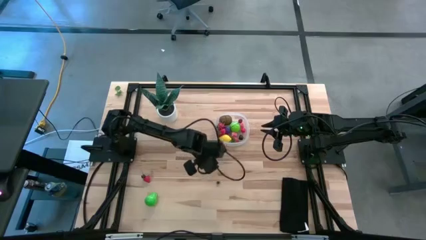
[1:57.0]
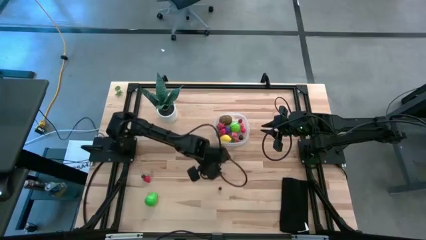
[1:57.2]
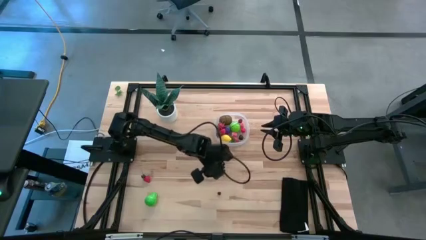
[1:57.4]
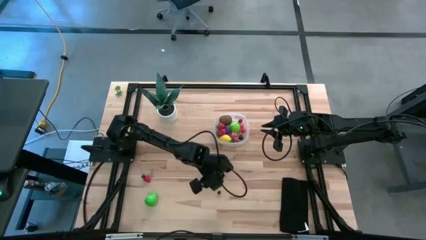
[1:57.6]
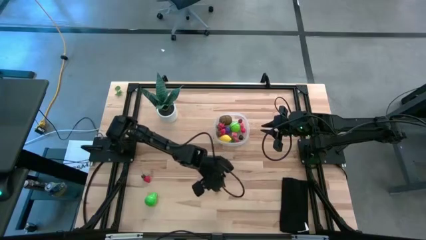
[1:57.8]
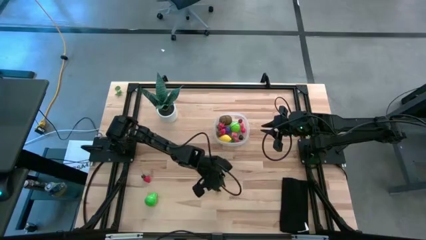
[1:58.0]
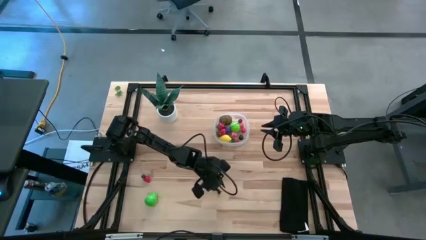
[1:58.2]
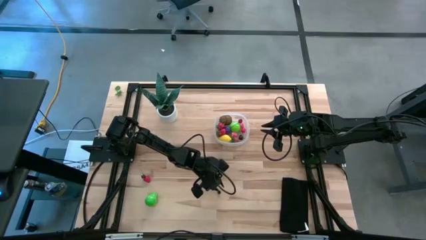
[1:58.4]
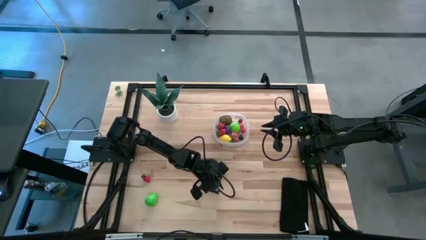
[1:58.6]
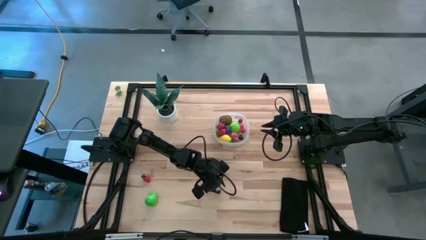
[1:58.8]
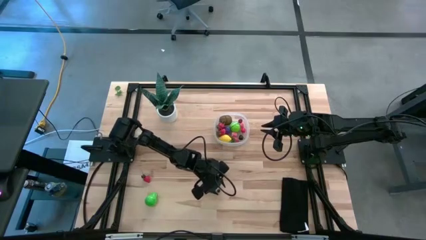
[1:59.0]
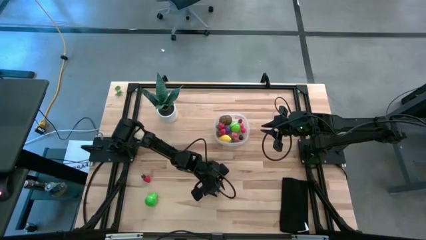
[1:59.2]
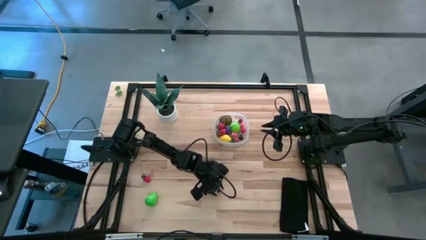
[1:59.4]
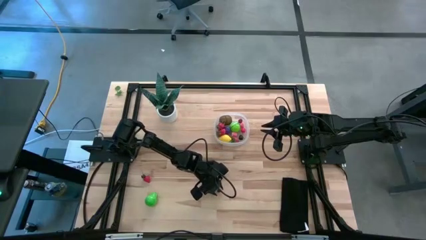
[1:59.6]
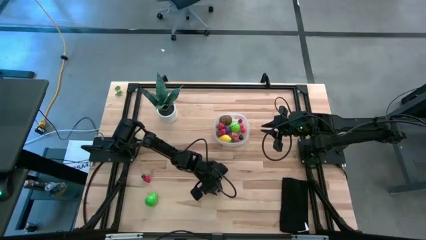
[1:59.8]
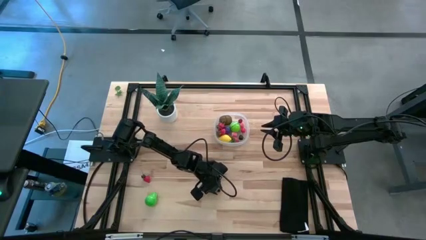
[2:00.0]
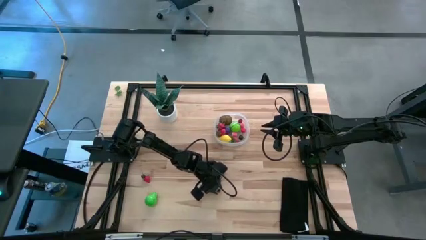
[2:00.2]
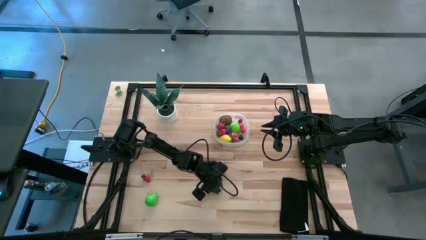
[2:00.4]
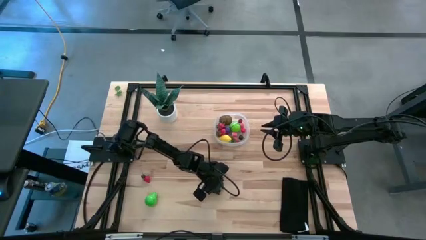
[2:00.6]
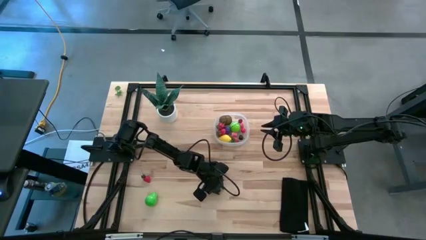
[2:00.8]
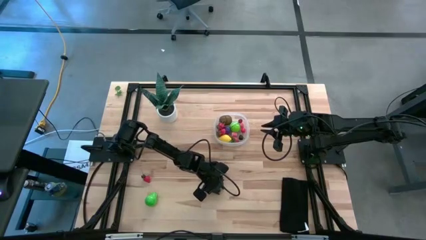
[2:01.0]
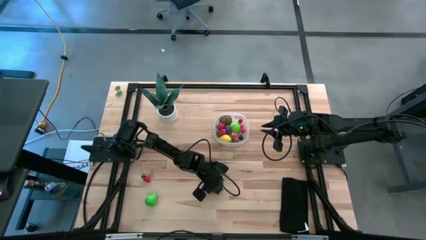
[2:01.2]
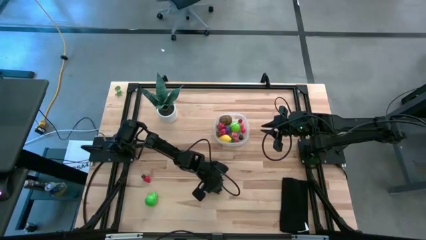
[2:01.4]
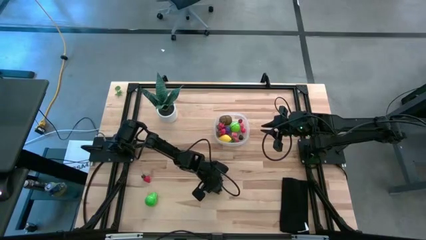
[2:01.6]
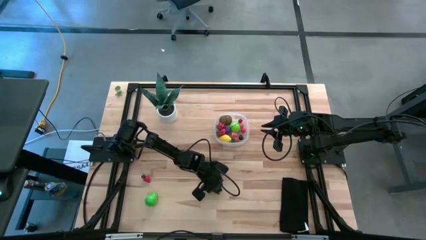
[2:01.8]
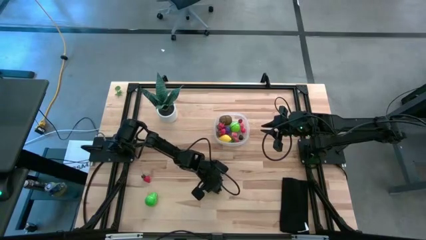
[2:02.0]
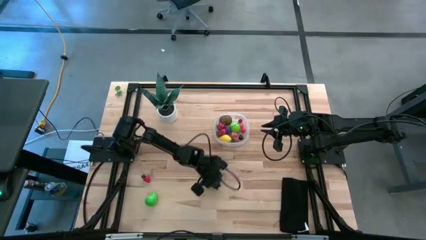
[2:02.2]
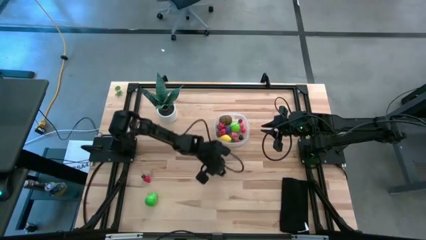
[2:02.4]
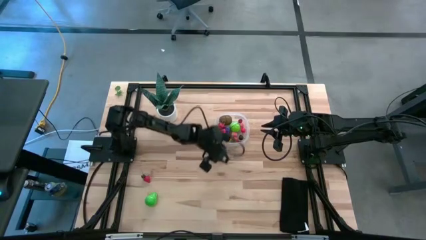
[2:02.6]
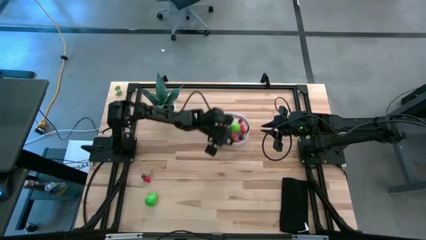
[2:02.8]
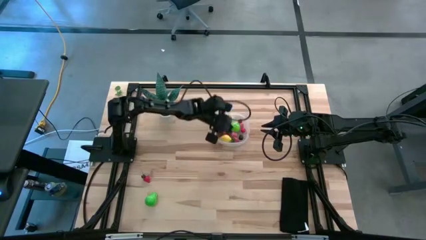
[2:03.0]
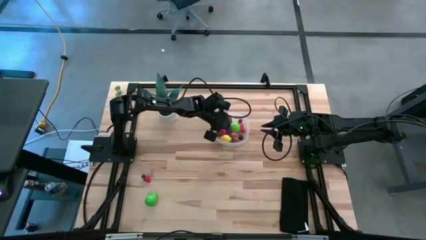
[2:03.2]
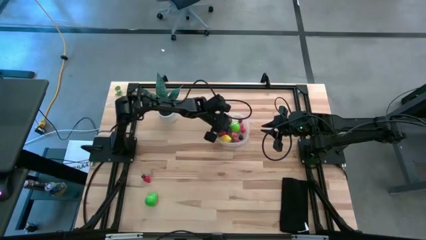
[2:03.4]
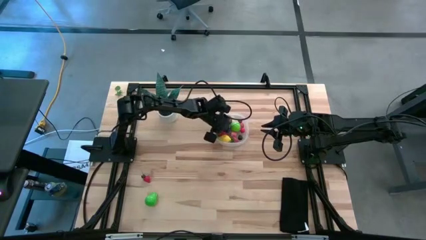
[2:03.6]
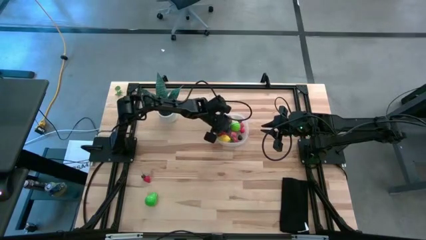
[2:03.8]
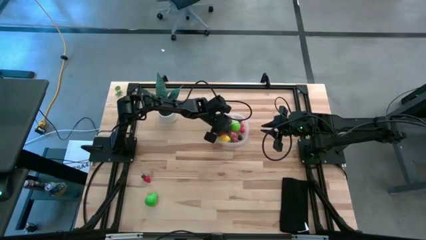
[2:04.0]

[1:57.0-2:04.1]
Task: Pick and placing Produce into tupperware
Put the blueberry into the transparent bin

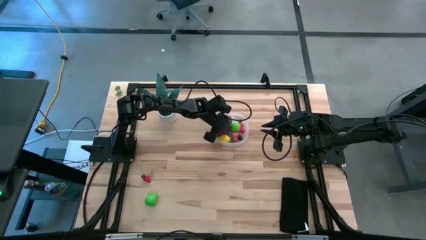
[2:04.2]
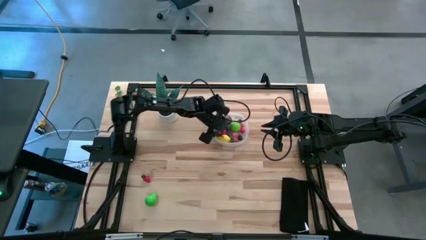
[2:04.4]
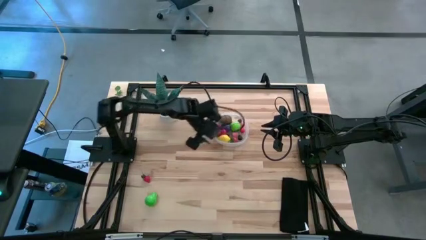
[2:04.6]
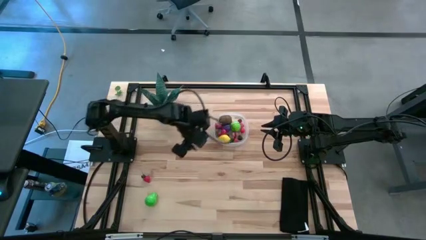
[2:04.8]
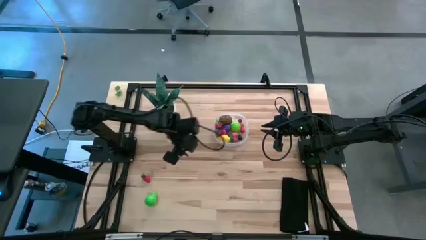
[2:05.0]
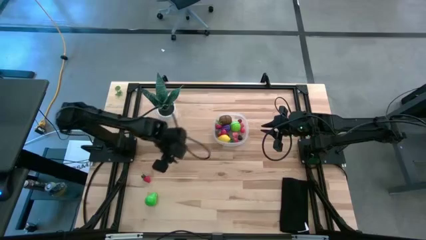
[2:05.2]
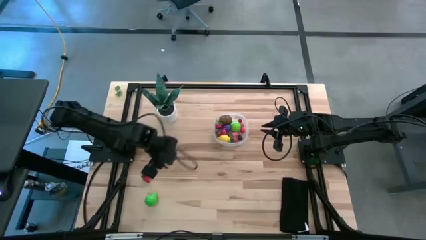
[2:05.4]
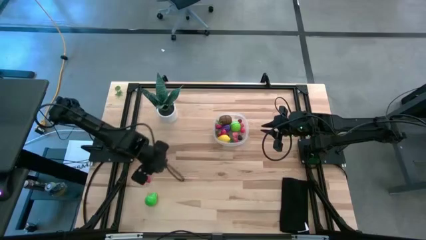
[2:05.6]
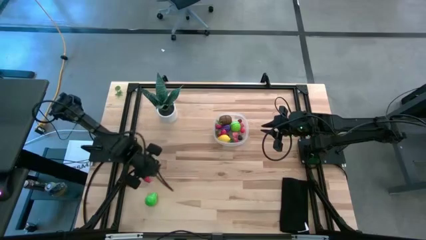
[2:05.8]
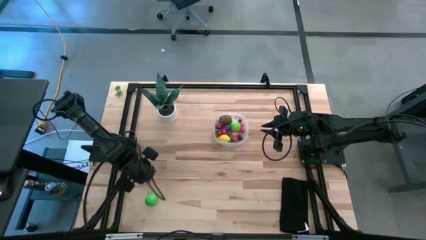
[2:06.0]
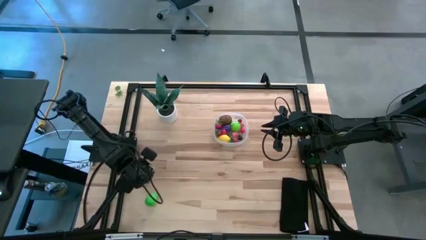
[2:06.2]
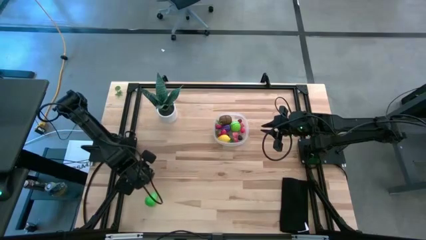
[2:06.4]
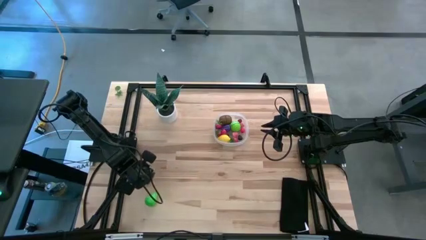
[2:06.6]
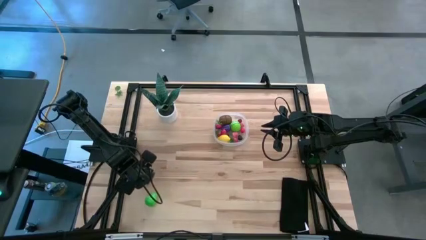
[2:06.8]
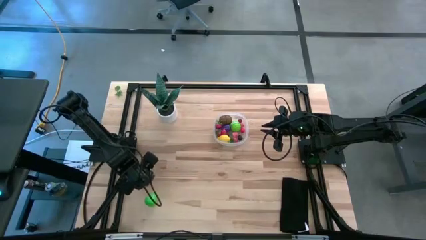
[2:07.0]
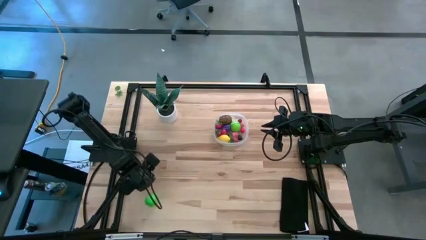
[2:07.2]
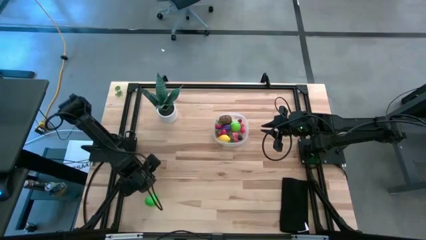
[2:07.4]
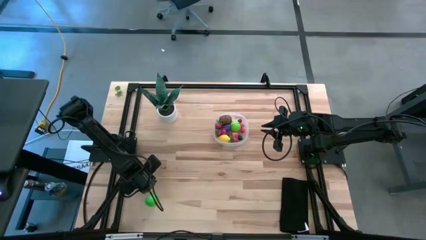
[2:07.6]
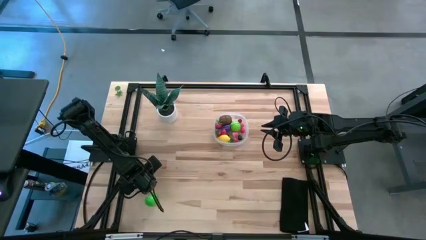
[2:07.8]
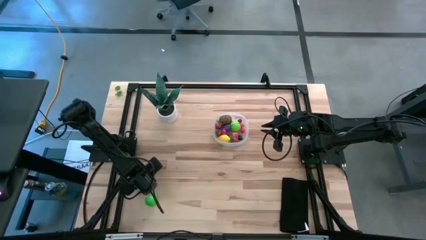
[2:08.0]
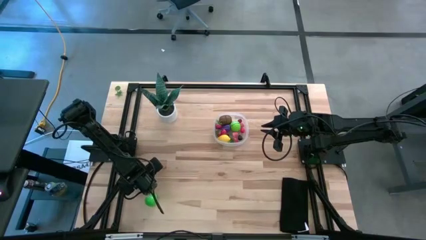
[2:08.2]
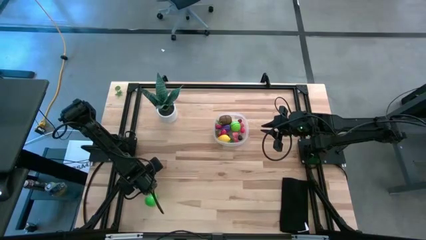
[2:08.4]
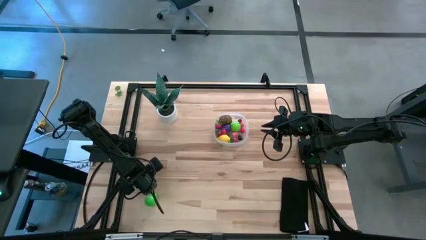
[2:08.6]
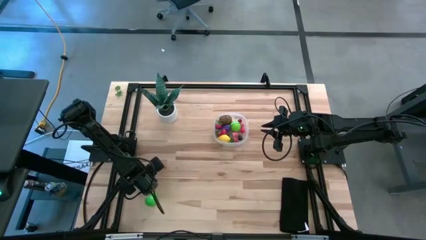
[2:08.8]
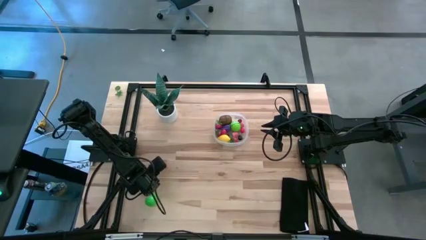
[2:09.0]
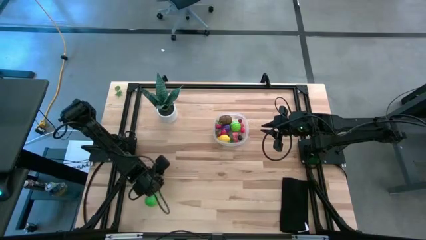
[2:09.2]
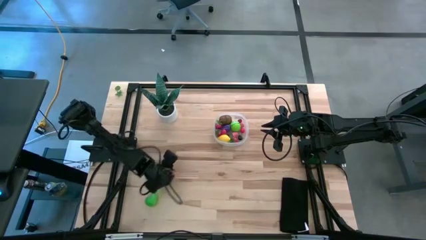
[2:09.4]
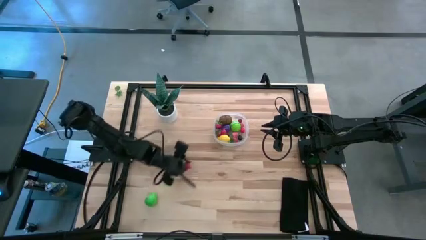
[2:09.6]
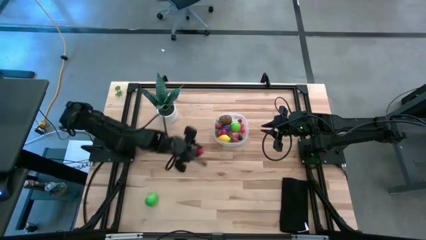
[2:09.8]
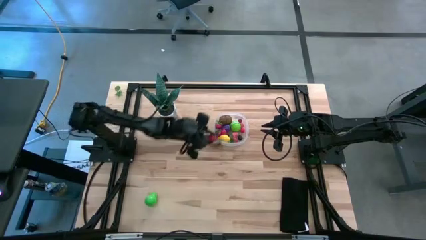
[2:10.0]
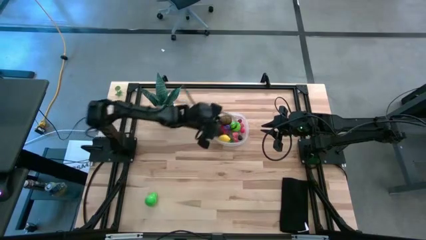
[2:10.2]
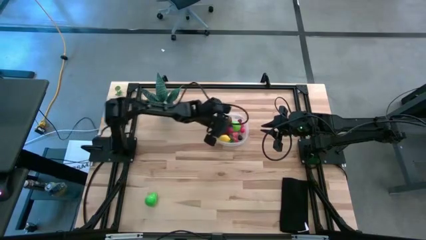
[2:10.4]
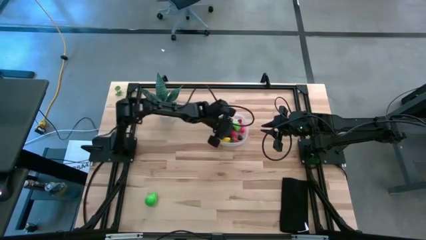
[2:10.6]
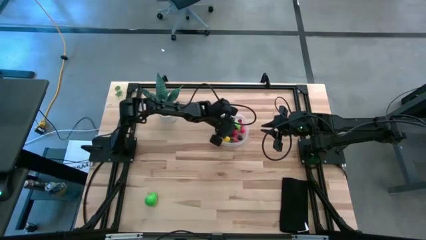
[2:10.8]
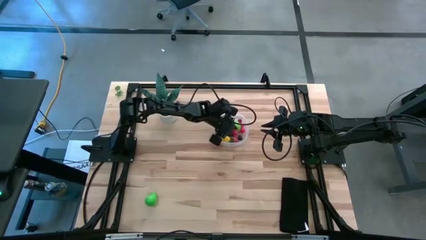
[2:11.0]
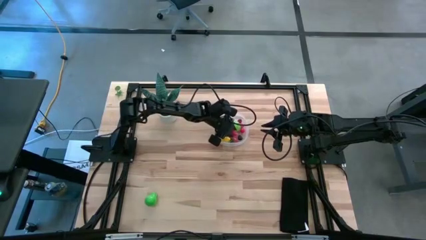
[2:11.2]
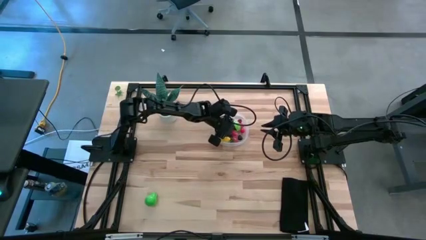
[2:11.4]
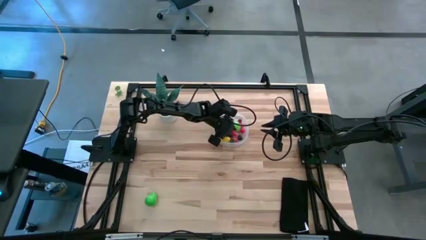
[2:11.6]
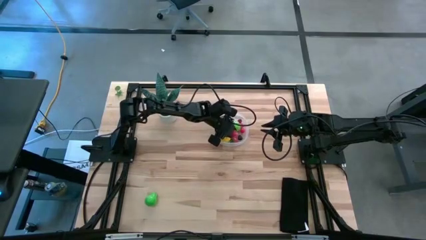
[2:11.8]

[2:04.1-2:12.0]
Put the strawberry into the transparent bin

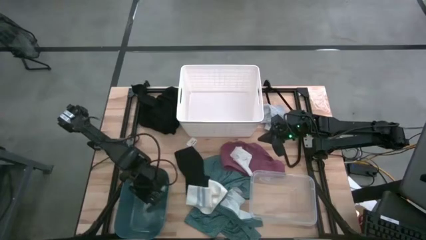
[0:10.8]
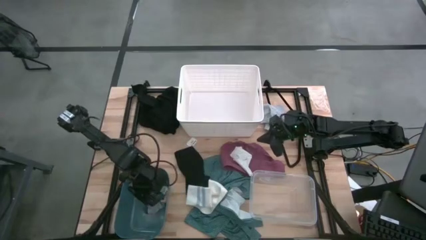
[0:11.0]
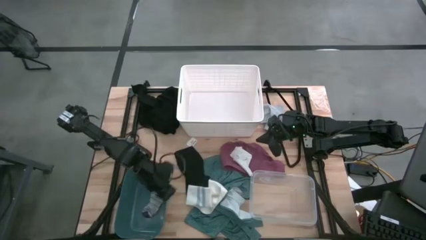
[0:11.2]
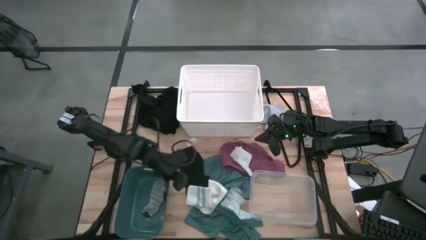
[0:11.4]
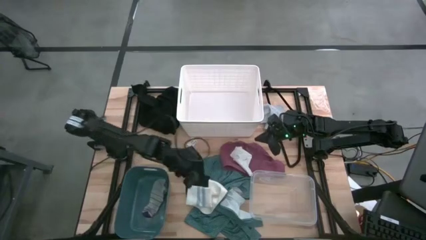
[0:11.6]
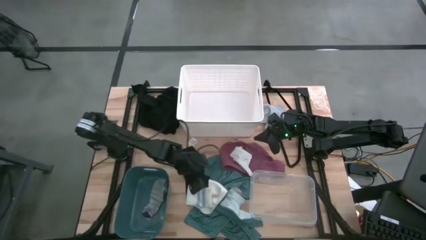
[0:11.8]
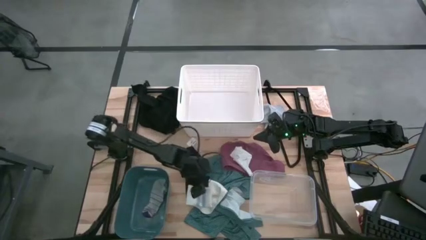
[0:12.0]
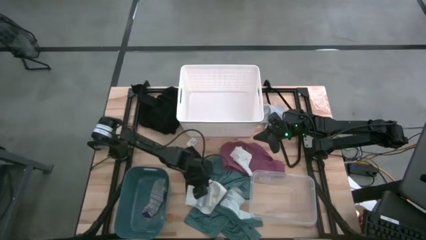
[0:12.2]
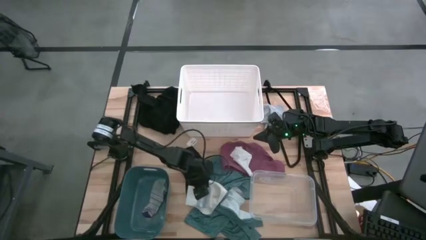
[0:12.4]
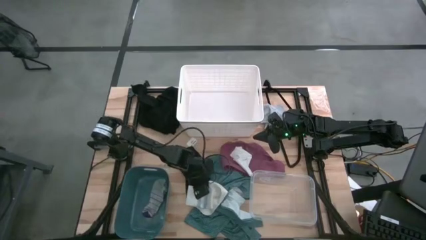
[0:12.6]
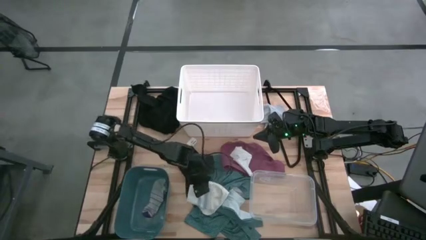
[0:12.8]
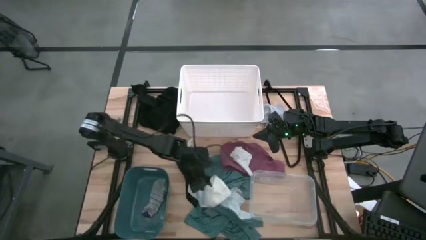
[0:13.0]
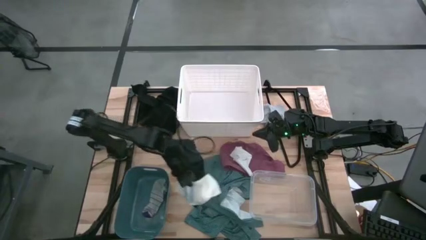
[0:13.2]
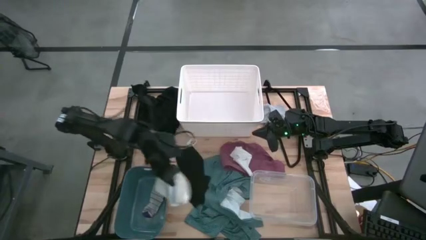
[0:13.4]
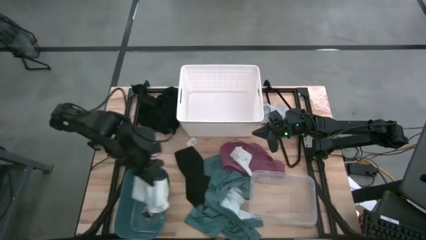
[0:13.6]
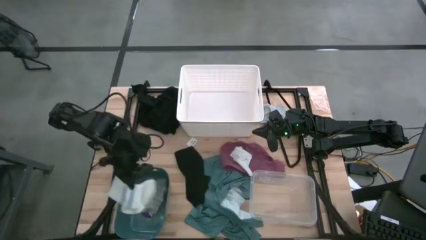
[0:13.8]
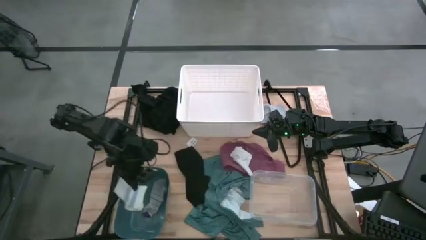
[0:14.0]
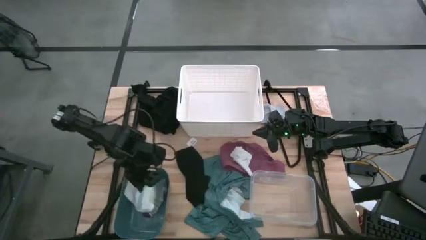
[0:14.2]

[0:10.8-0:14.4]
Task: Pick & Place Cloths
Put the white striped sock into the blue bin
